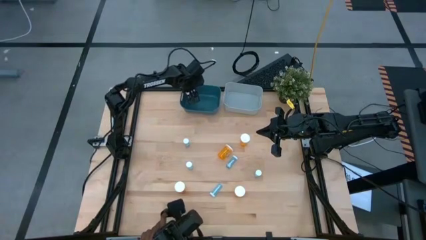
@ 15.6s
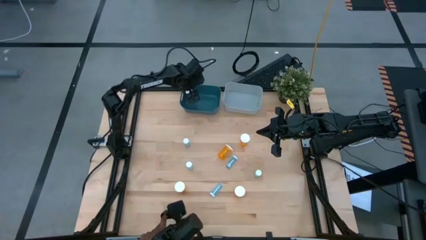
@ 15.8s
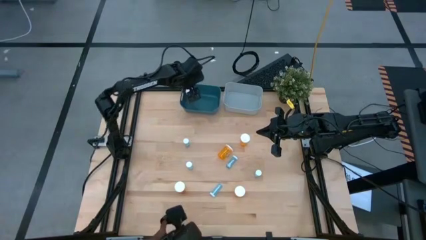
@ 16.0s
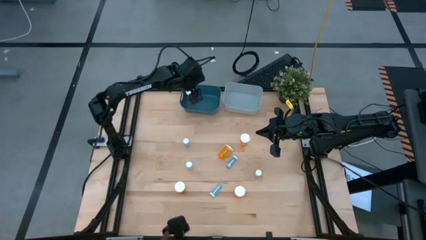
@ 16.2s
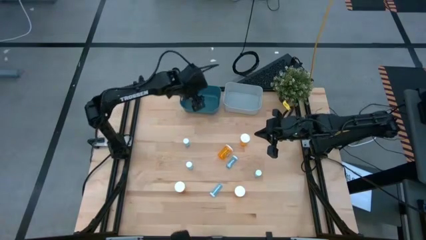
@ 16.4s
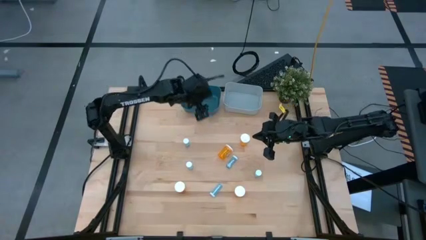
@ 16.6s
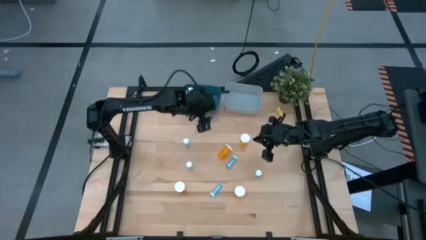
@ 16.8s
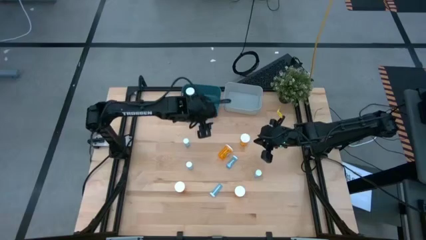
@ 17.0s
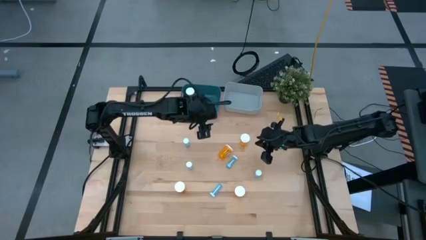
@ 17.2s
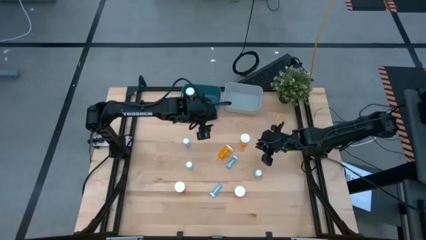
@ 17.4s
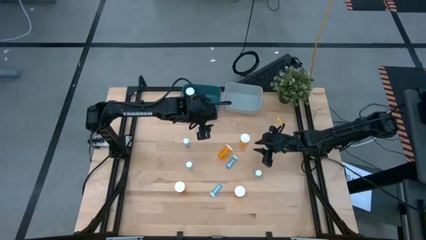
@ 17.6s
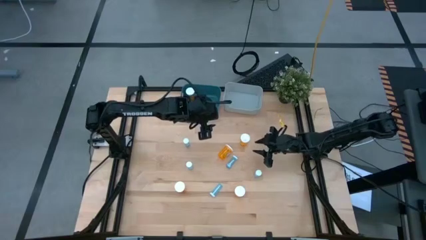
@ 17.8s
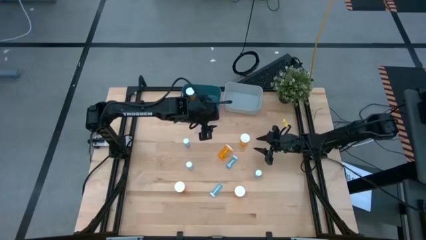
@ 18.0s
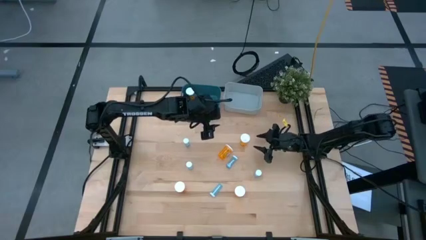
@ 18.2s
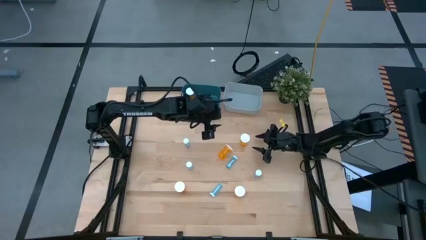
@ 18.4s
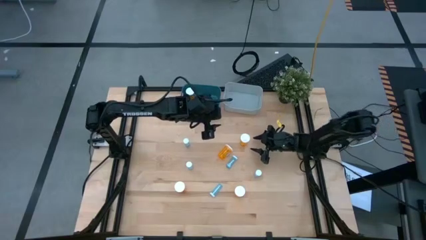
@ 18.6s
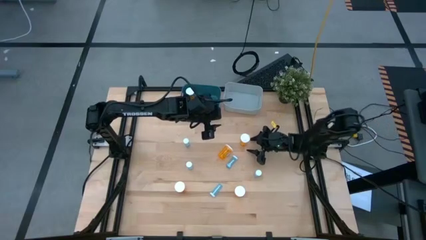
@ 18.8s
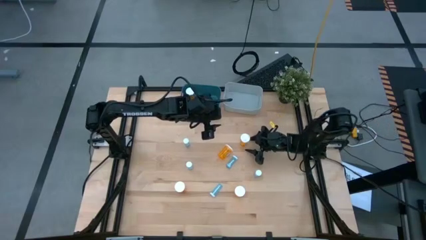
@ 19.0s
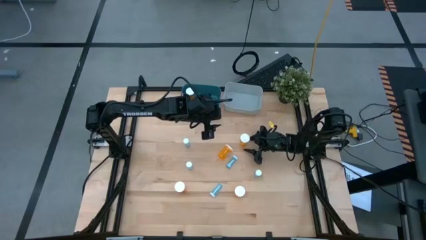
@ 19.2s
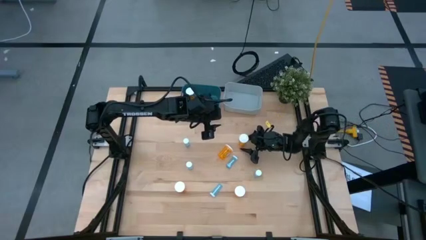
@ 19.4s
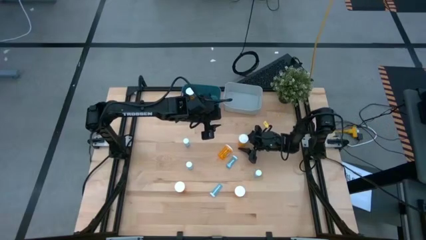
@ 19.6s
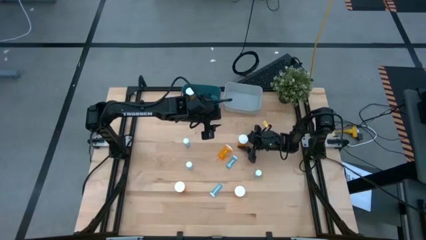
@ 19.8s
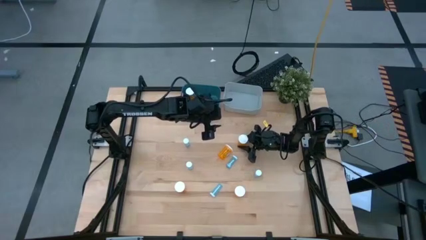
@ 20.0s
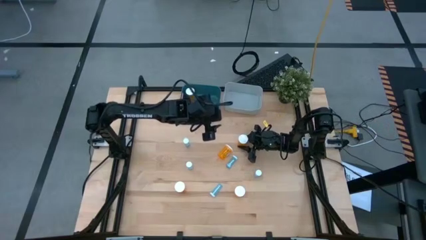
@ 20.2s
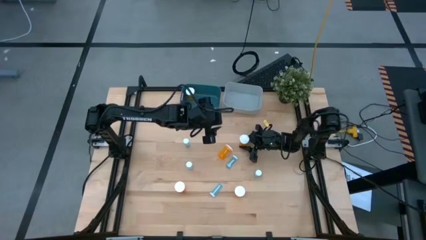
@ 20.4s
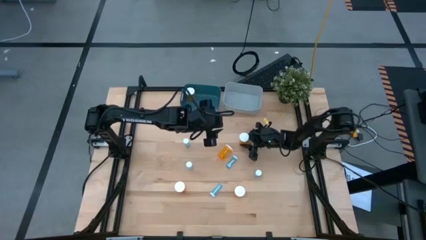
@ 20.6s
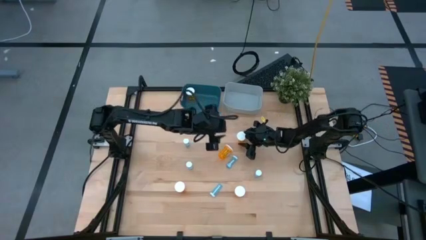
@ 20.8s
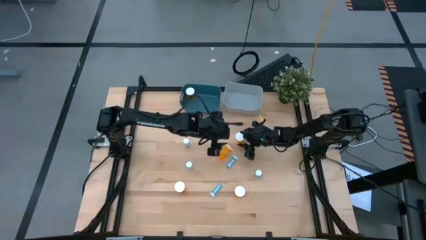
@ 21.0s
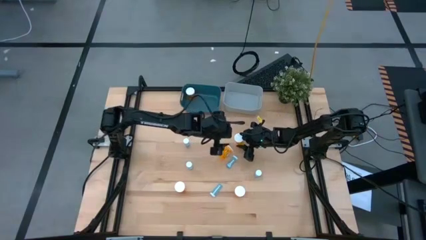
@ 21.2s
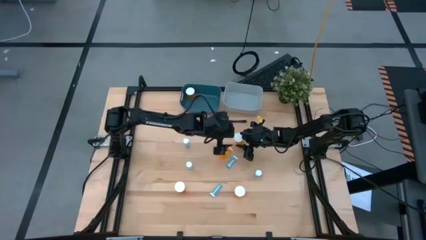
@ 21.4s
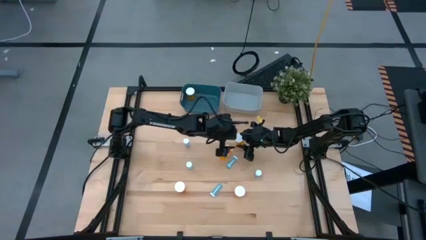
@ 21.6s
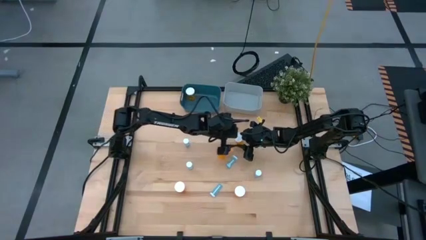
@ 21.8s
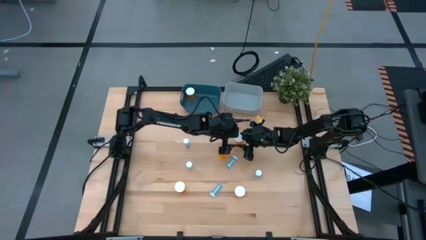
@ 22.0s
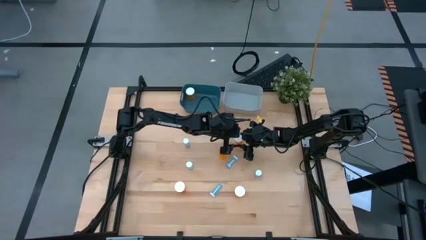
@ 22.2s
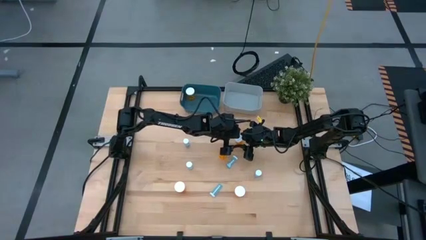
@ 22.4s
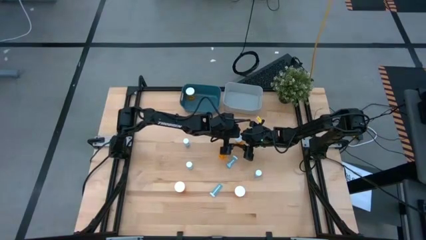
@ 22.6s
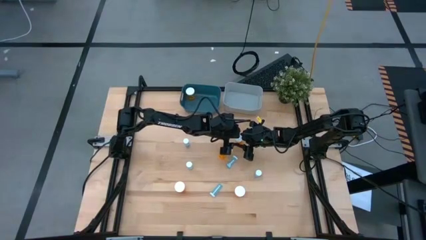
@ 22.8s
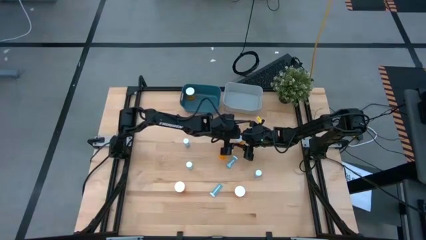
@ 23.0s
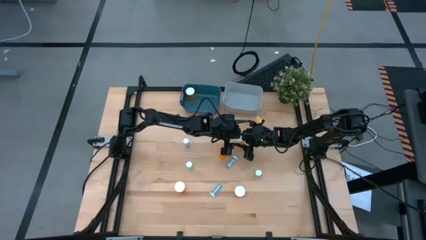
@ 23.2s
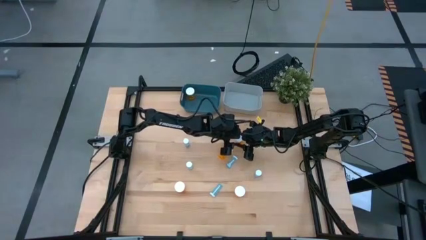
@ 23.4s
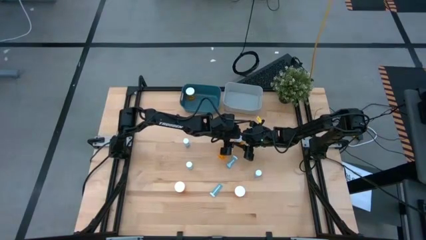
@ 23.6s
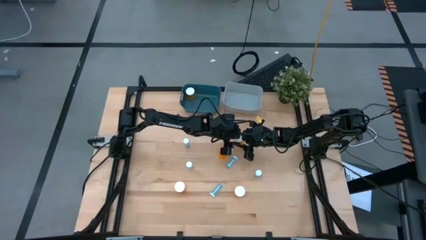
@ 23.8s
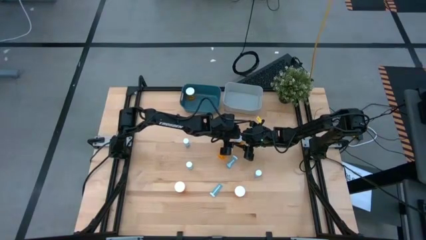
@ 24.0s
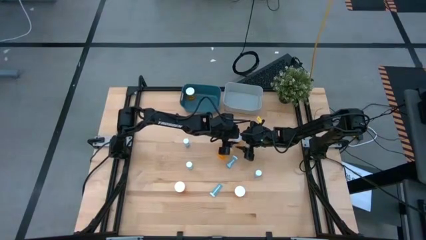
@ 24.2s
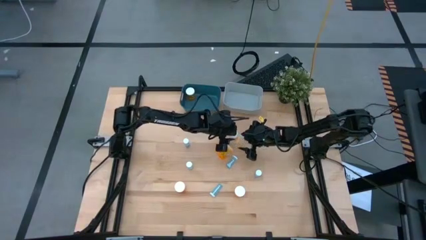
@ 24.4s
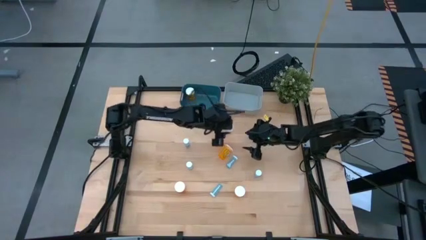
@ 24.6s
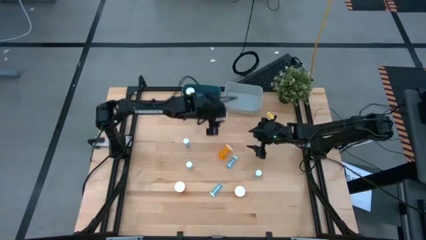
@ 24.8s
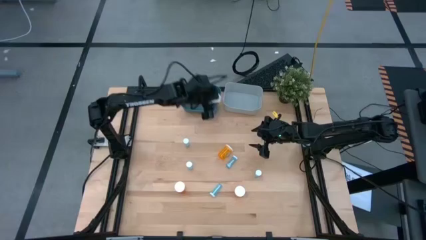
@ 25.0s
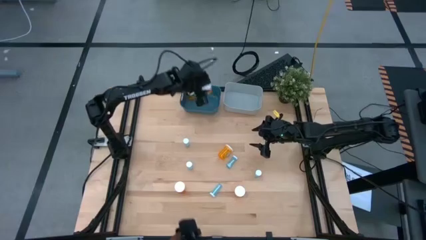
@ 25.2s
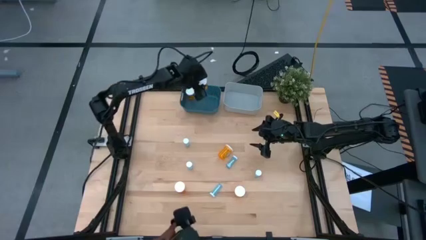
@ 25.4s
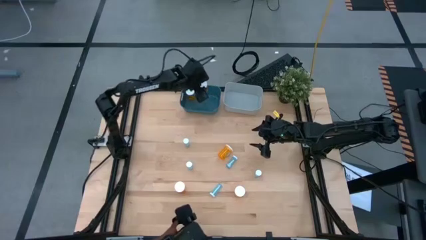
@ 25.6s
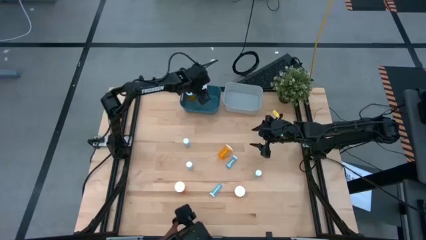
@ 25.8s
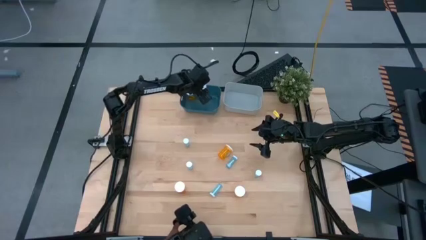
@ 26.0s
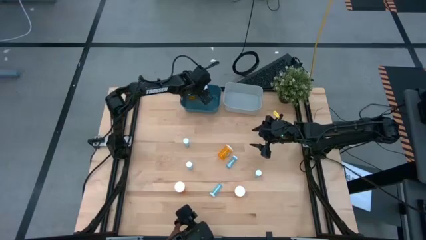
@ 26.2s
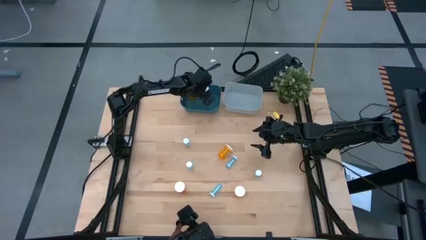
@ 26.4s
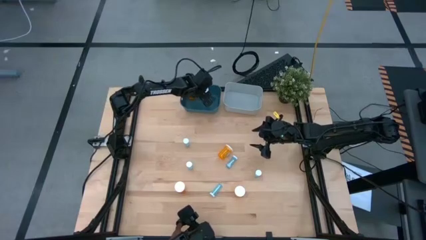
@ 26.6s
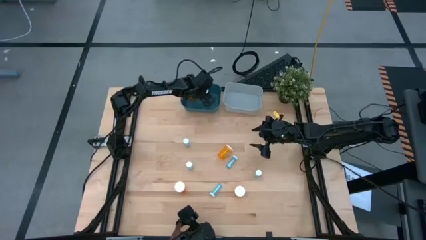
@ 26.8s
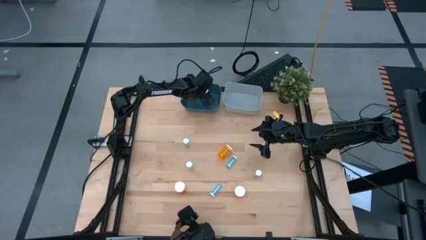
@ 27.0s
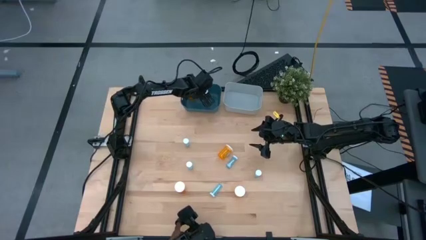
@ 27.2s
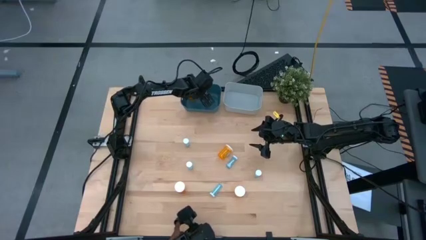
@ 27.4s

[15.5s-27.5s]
Task: Pick and place medicine bottles into bin by pill shape (circle, oval)
Put the orange pill bottle into the blue bin
